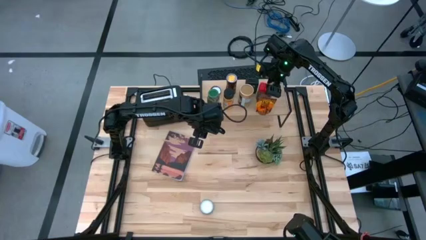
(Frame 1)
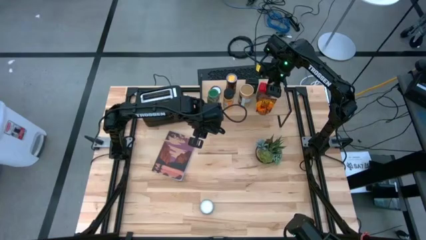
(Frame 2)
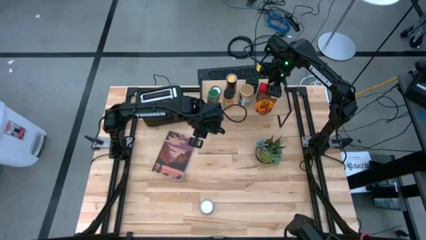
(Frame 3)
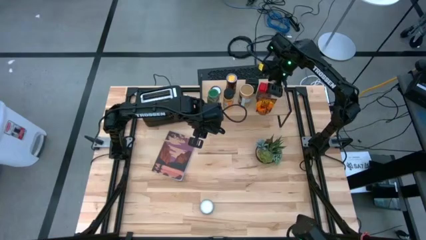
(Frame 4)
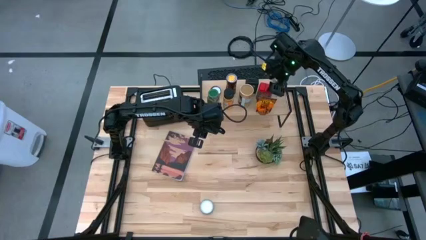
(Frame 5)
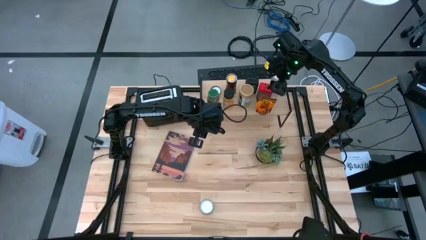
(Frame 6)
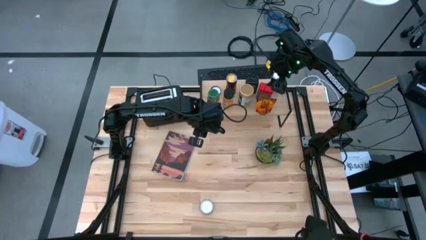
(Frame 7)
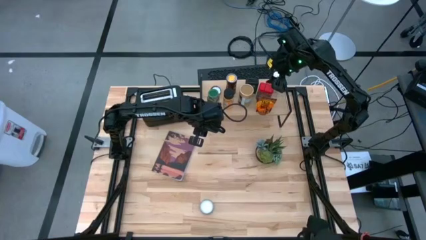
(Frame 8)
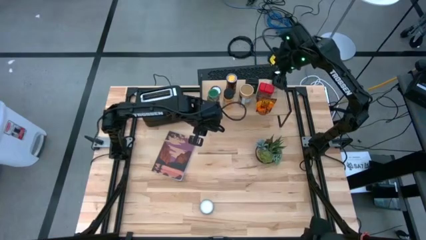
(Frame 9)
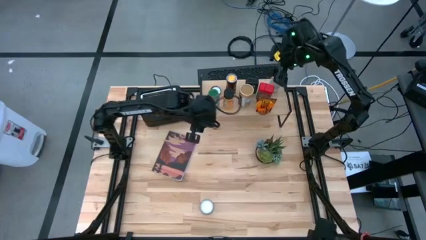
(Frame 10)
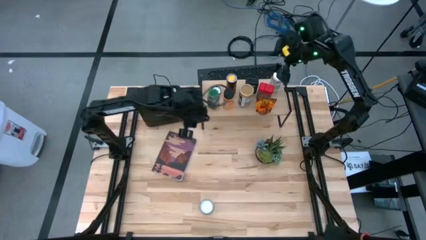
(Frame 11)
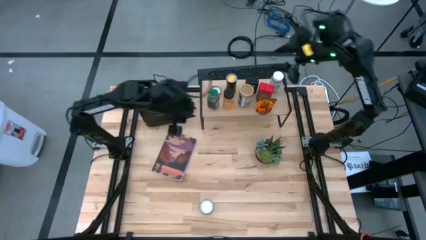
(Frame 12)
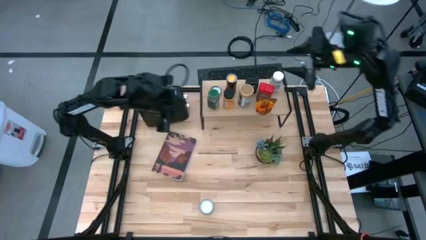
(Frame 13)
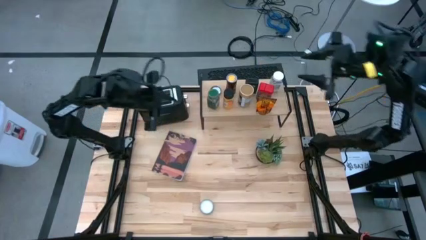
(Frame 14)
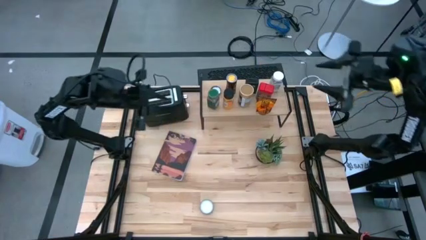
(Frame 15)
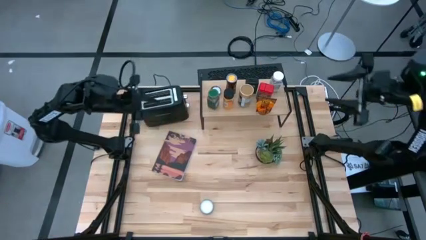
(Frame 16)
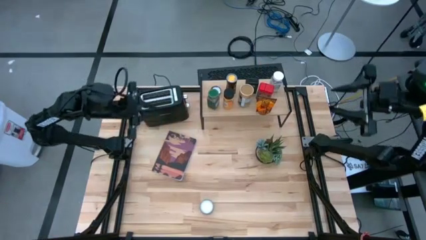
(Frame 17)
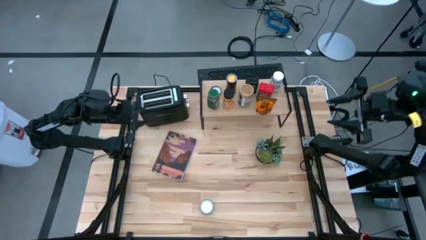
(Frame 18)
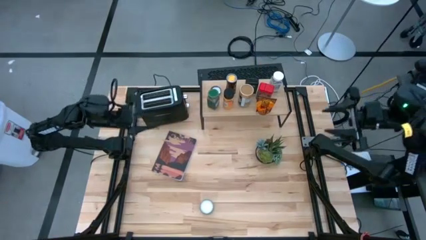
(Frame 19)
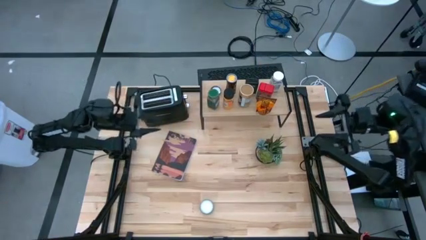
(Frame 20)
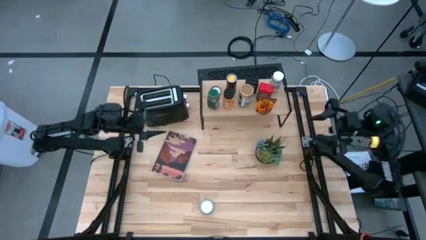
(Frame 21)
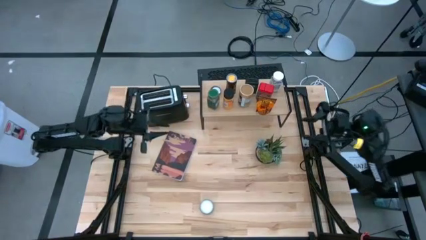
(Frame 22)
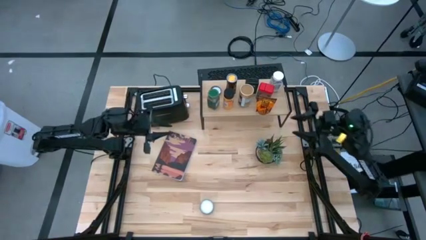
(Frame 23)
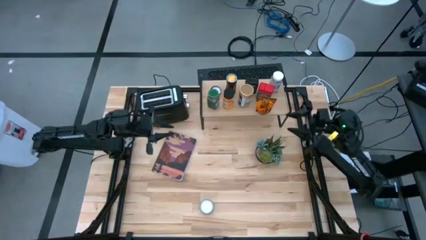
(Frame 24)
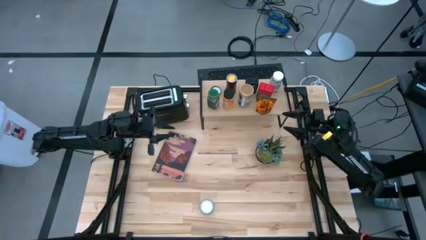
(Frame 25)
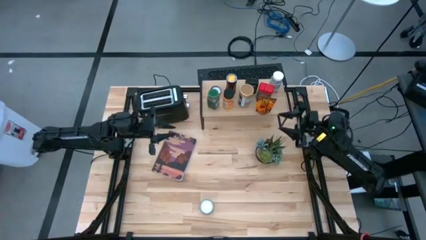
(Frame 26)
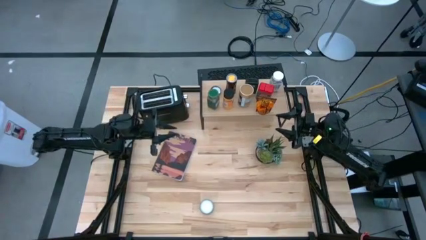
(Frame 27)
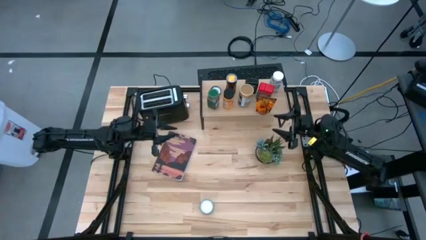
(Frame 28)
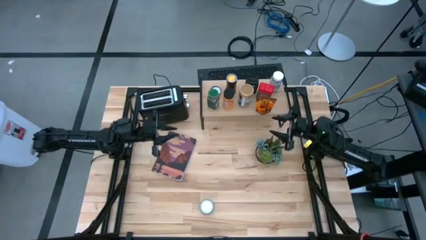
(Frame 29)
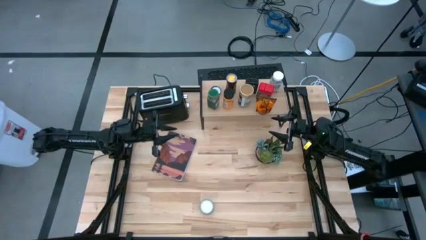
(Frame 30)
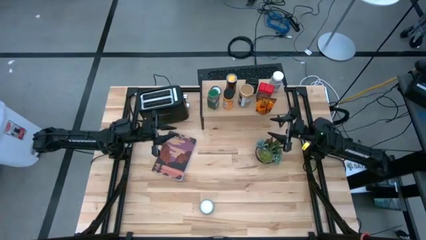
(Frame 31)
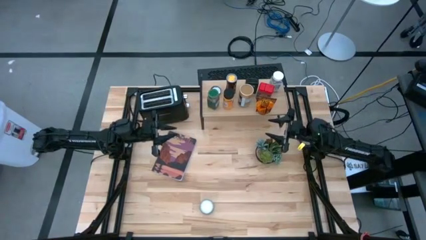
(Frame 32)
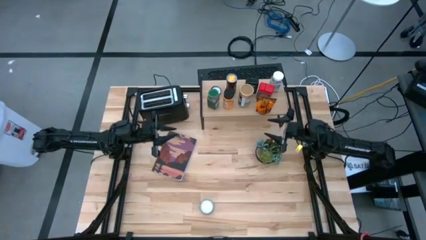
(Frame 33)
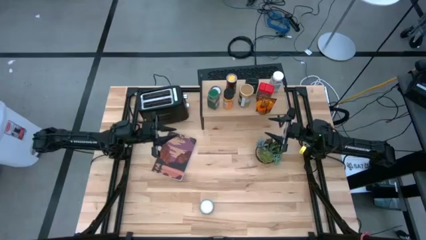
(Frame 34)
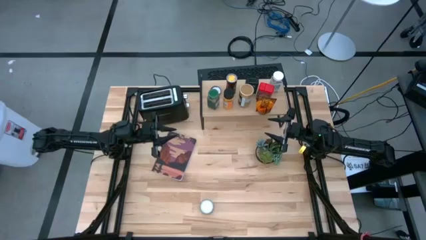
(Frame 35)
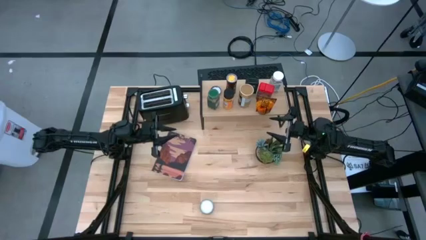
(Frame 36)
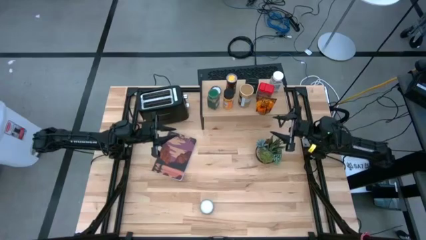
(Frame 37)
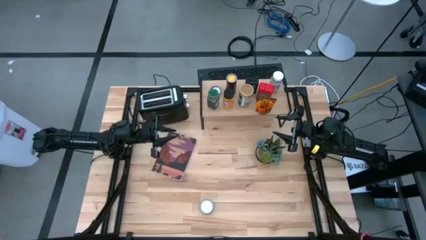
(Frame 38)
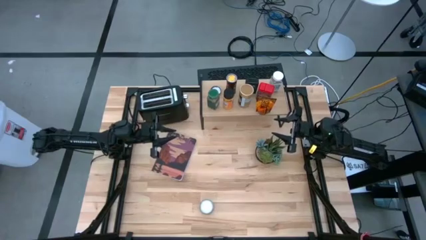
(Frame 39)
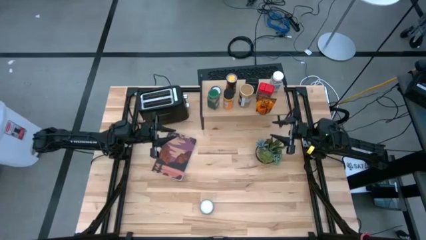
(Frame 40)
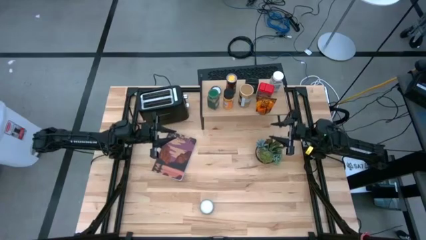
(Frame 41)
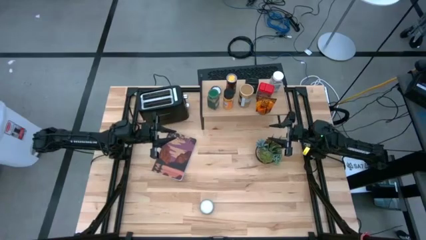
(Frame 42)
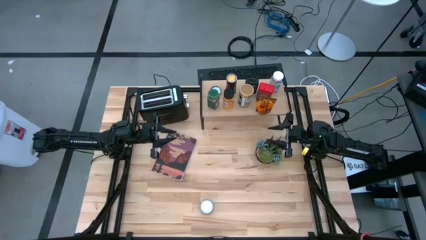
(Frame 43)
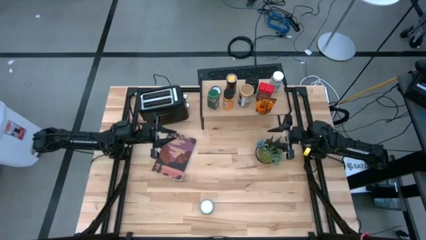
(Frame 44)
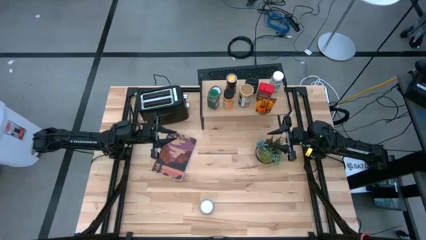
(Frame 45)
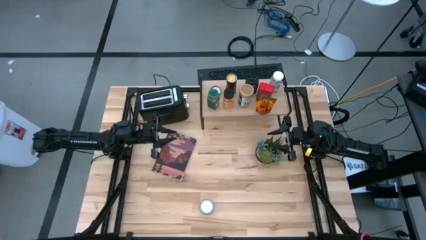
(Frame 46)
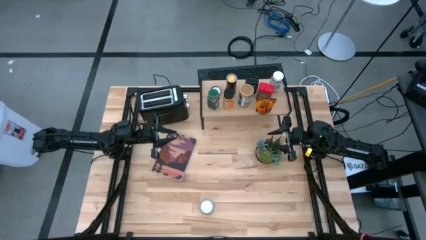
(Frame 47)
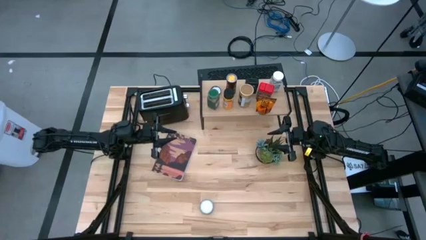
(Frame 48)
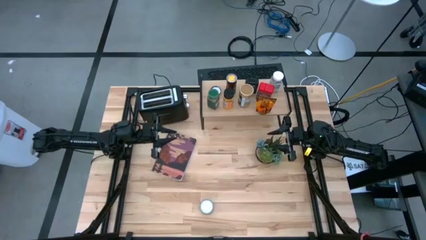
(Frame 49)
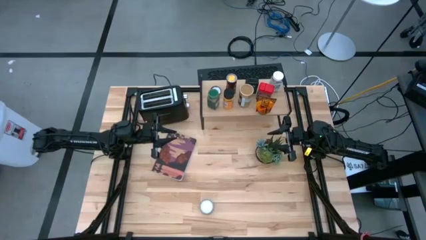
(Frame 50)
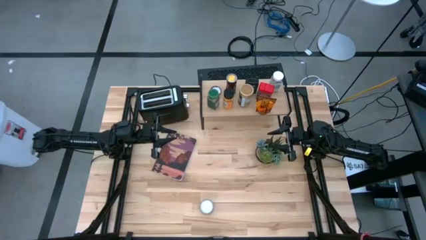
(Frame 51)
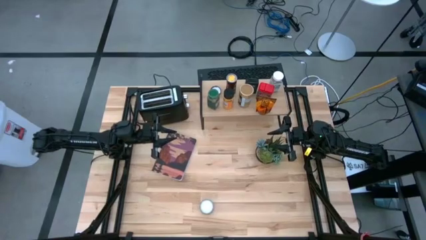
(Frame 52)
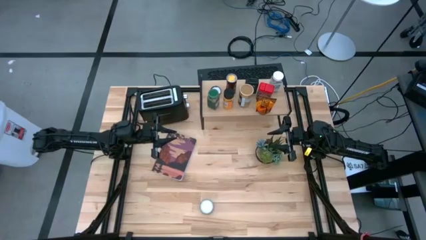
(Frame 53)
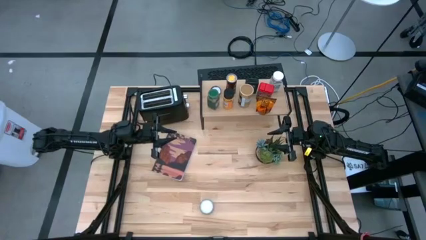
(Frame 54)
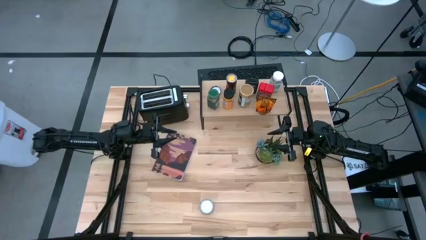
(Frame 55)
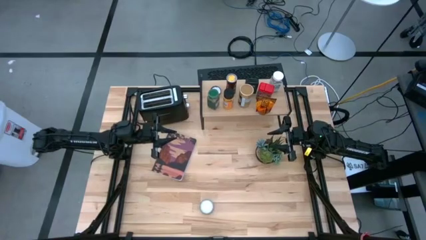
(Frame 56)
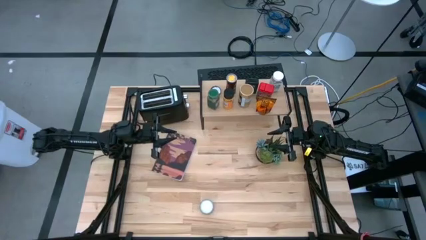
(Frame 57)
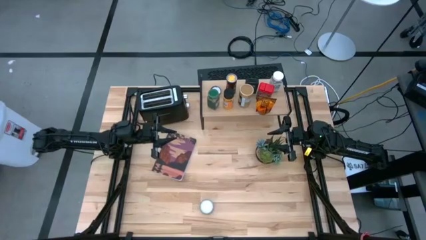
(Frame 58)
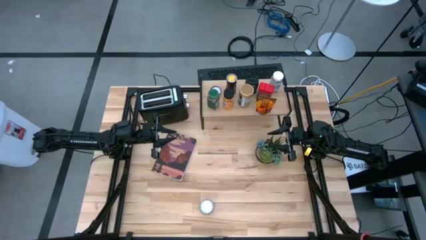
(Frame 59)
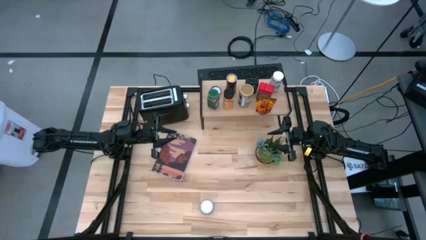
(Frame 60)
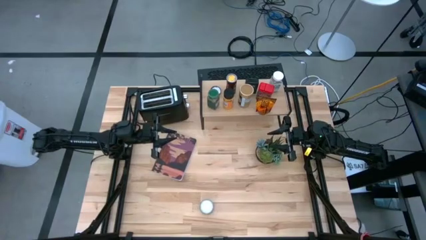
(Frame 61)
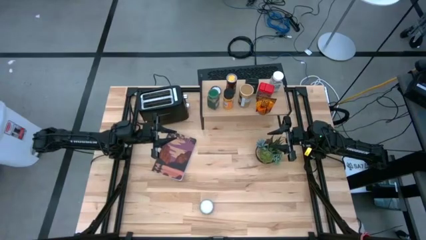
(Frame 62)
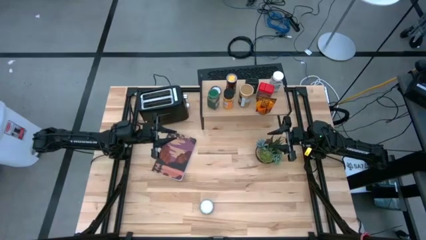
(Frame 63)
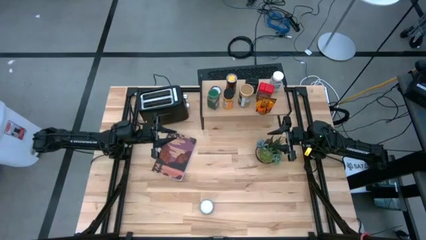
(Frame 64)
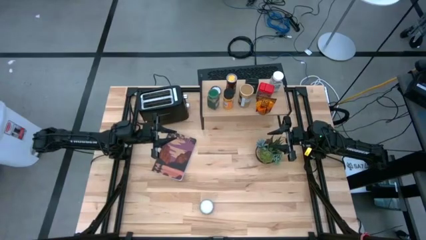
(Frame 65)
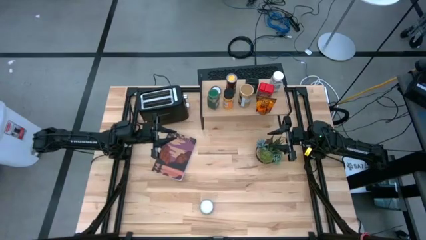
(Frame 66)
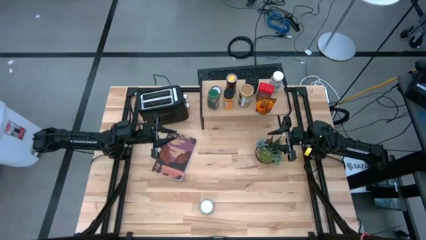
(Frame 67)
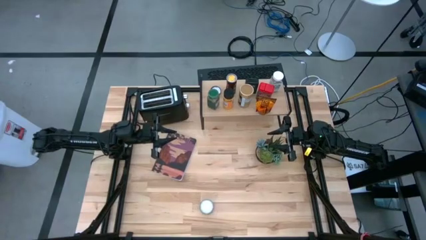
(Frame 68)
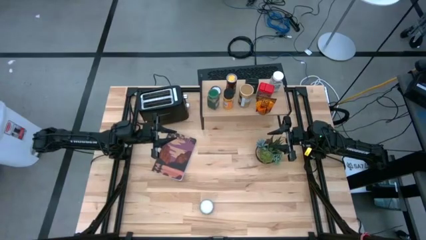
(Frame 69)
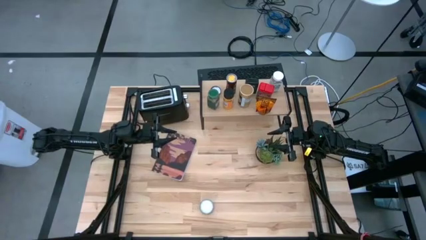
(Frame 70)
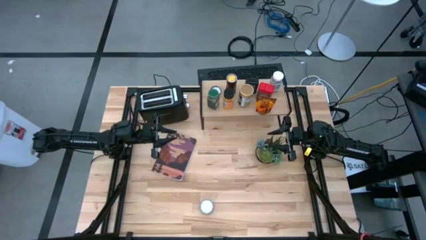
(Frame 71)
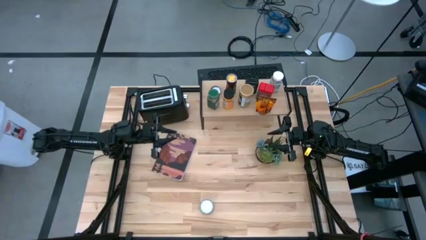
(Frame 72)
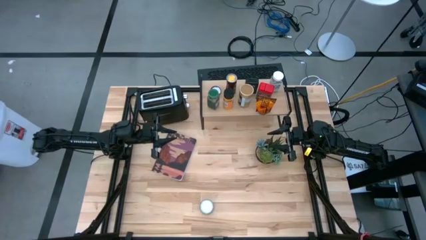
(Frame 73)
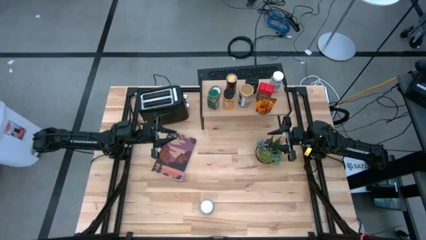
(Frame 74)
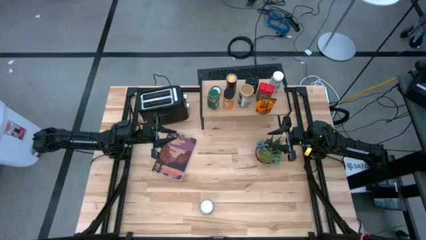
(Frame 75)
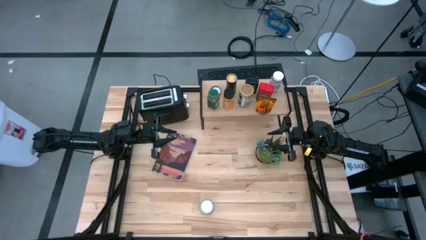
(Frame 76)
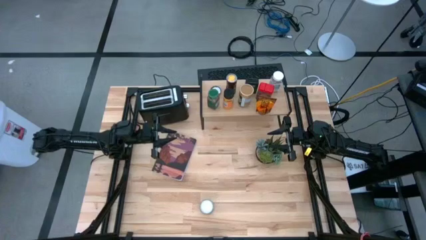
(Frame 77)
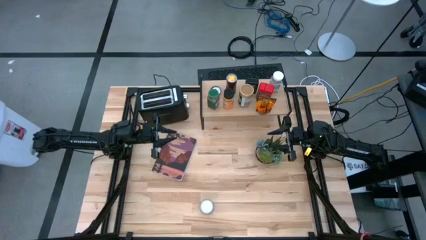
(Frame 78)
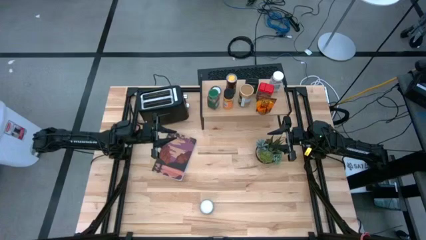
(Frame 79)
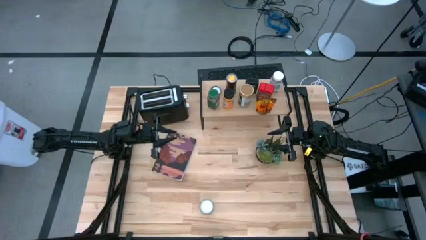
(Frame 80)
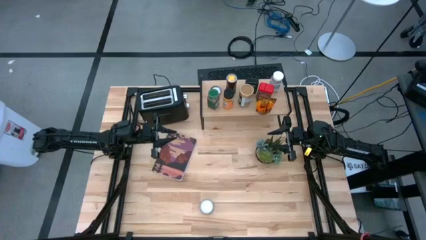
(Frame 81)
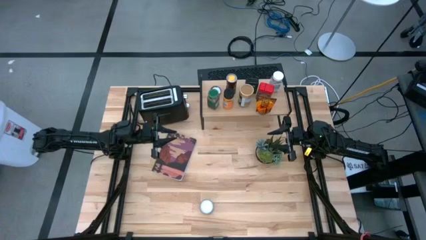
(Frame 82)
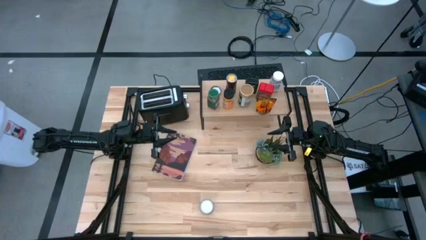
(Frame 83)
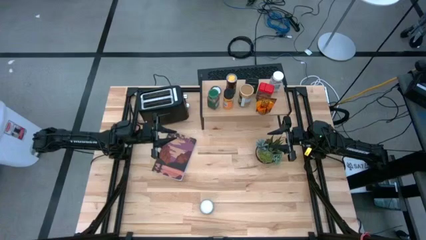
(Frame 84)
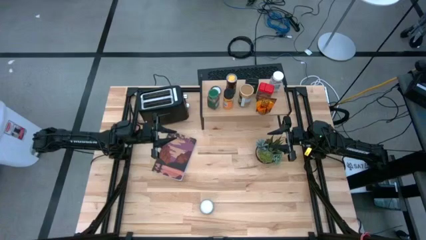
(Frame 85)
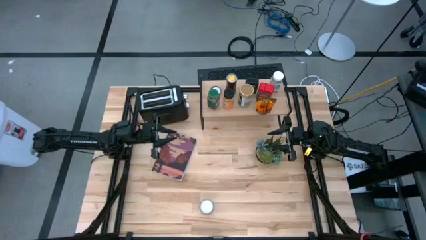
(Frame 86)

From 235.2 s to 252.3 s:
Task: Shelf spices
Return to Home Position
